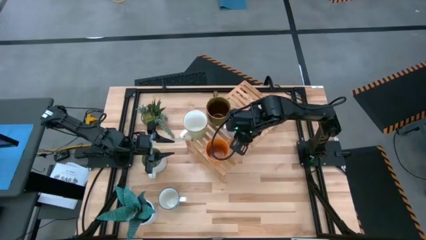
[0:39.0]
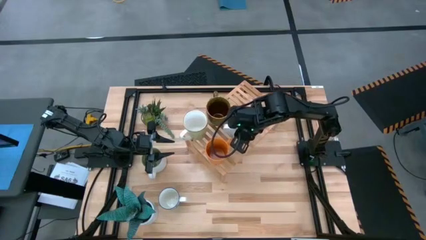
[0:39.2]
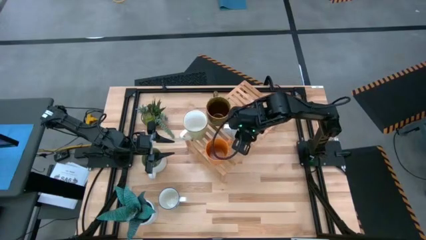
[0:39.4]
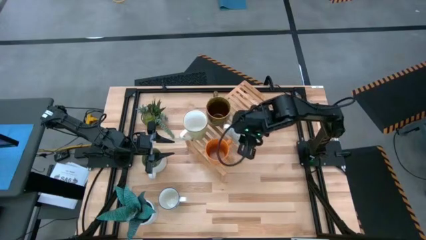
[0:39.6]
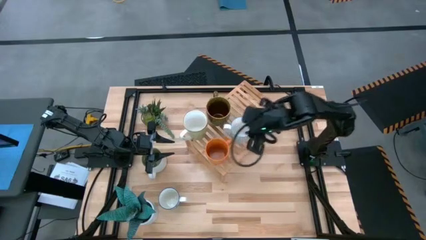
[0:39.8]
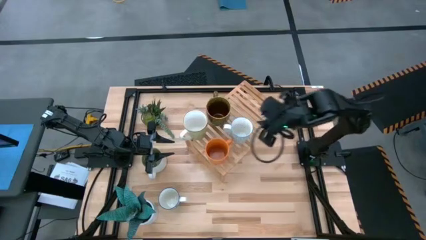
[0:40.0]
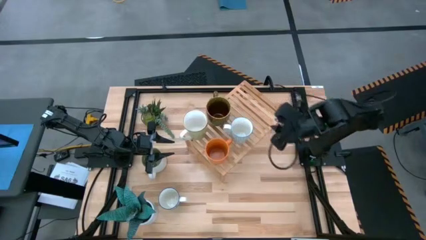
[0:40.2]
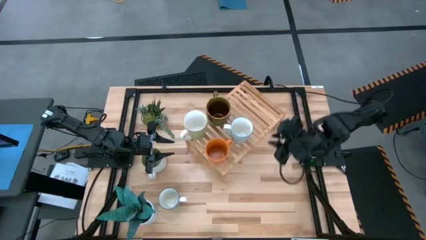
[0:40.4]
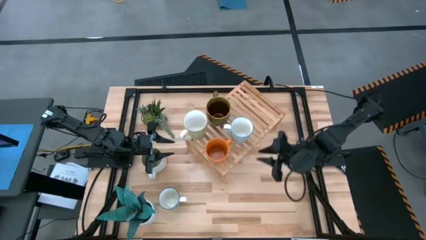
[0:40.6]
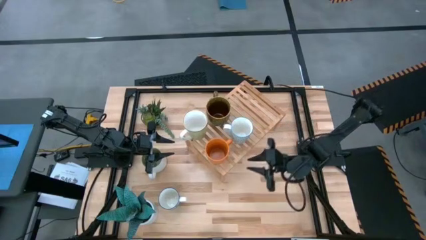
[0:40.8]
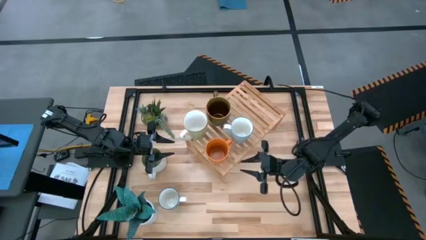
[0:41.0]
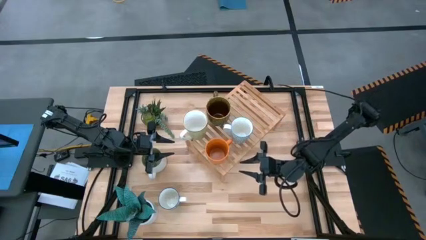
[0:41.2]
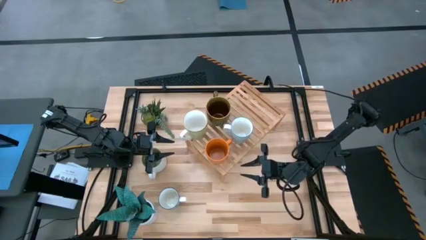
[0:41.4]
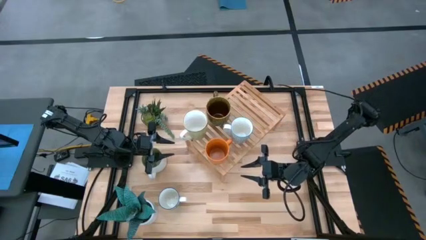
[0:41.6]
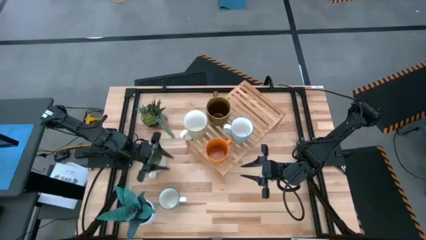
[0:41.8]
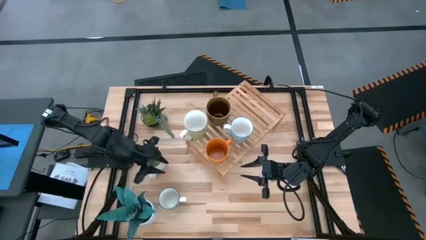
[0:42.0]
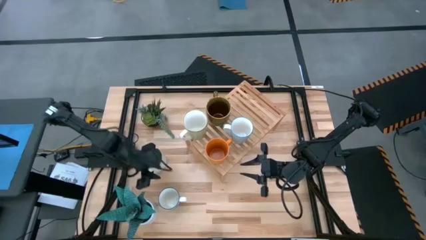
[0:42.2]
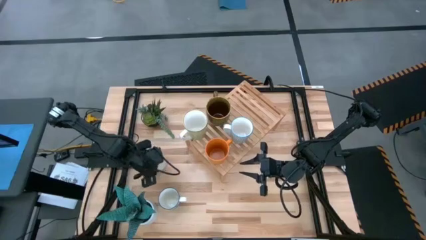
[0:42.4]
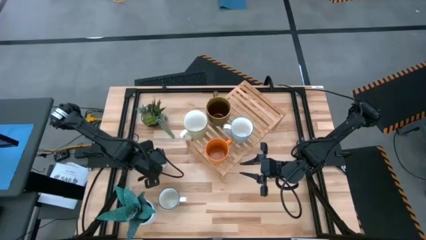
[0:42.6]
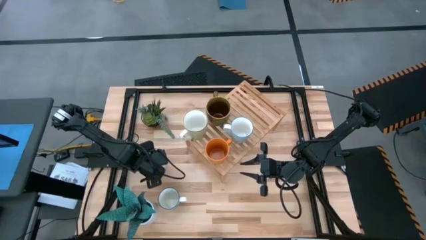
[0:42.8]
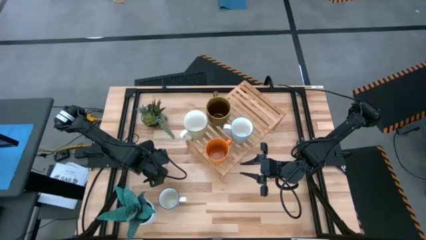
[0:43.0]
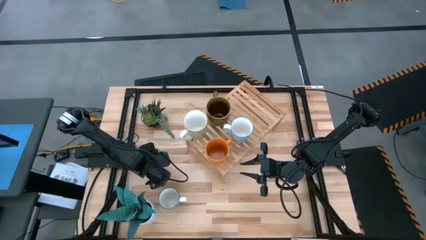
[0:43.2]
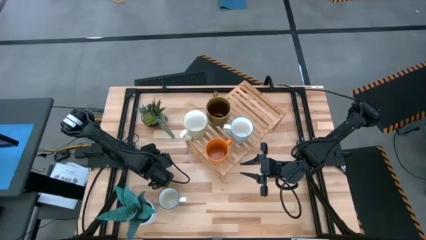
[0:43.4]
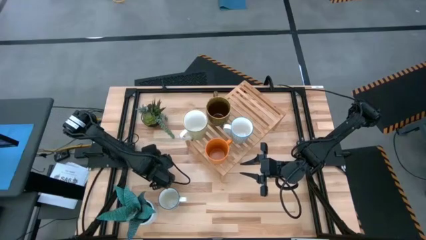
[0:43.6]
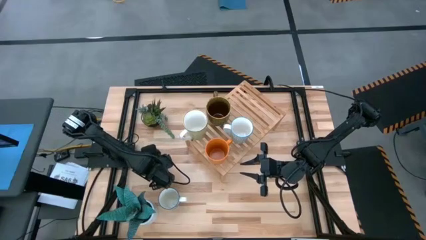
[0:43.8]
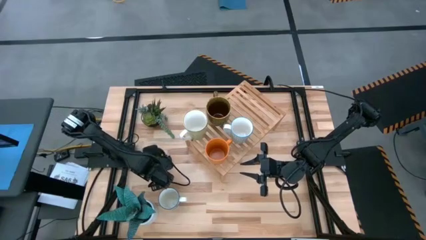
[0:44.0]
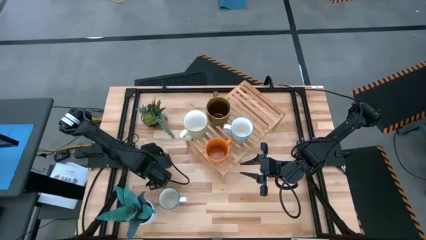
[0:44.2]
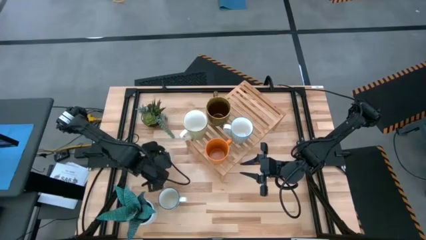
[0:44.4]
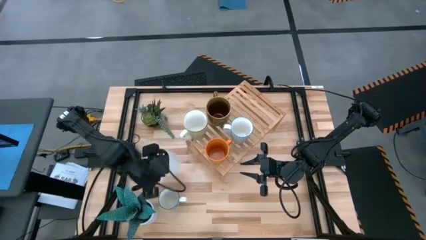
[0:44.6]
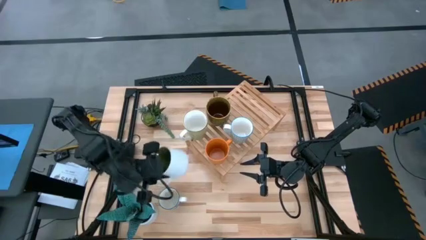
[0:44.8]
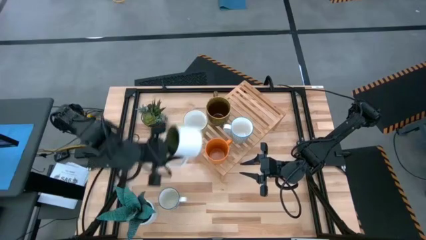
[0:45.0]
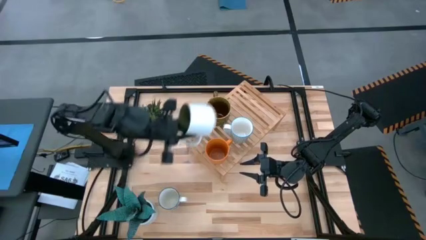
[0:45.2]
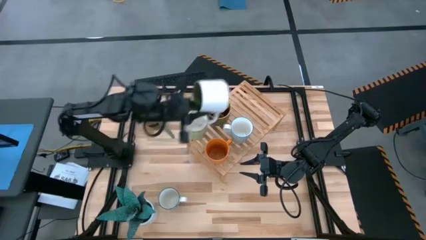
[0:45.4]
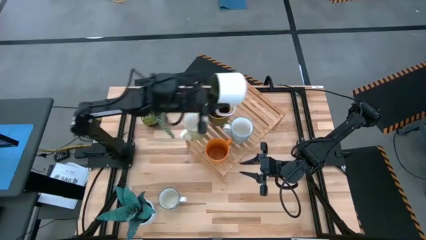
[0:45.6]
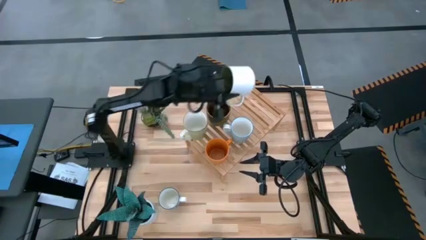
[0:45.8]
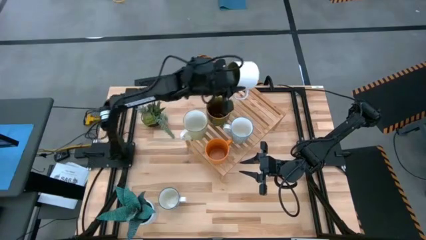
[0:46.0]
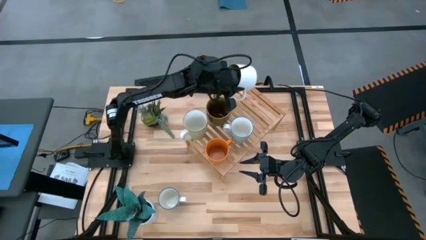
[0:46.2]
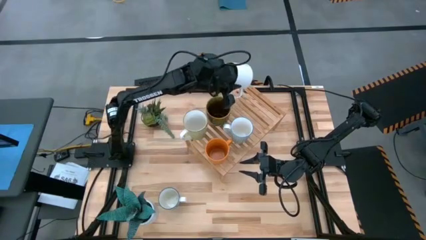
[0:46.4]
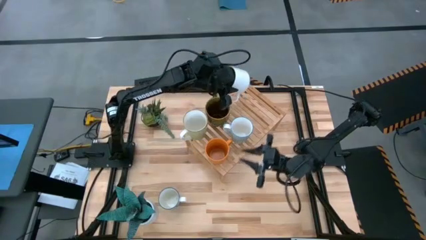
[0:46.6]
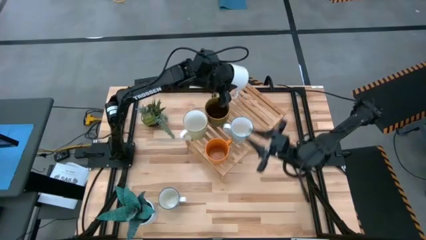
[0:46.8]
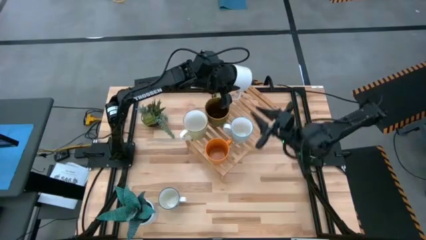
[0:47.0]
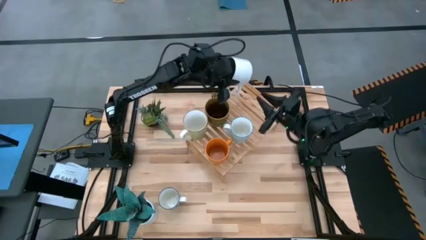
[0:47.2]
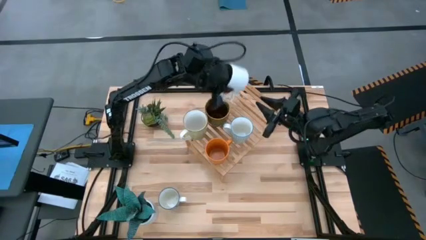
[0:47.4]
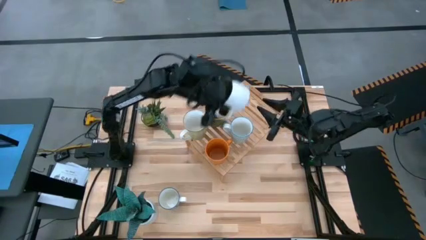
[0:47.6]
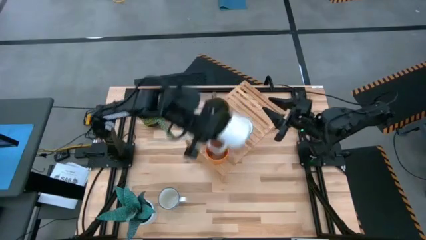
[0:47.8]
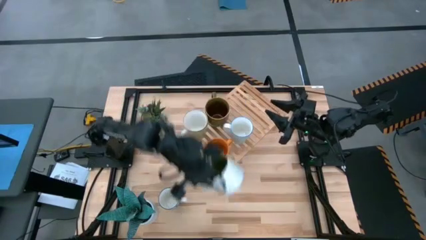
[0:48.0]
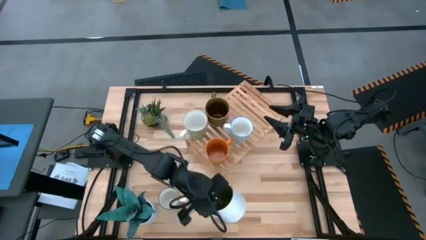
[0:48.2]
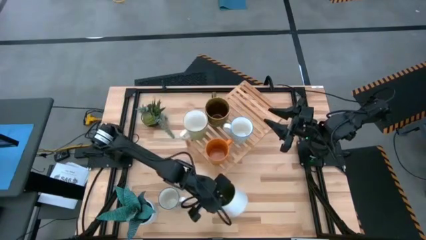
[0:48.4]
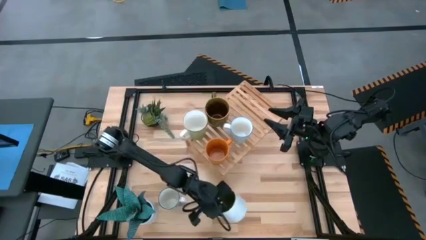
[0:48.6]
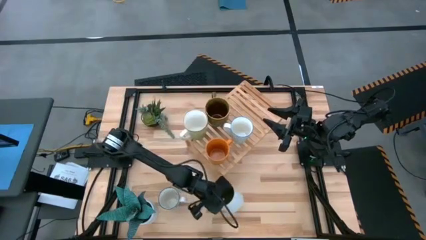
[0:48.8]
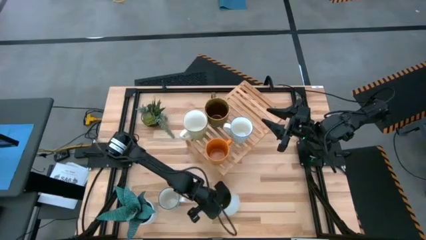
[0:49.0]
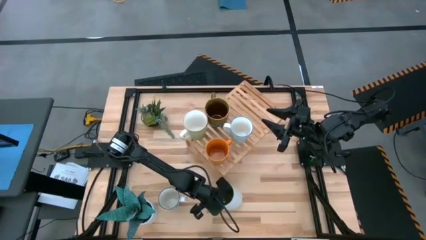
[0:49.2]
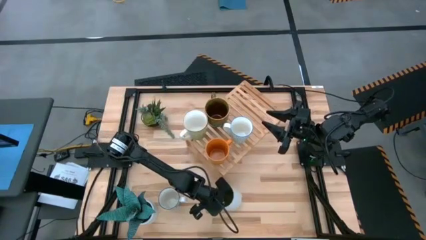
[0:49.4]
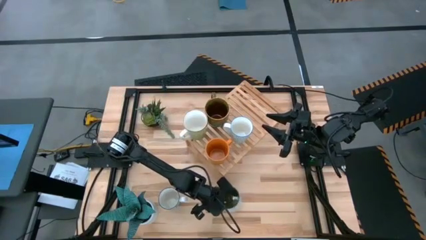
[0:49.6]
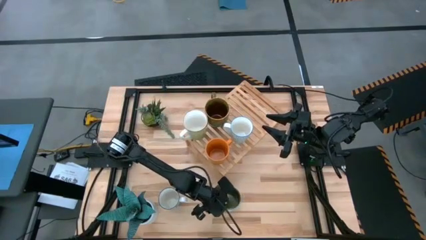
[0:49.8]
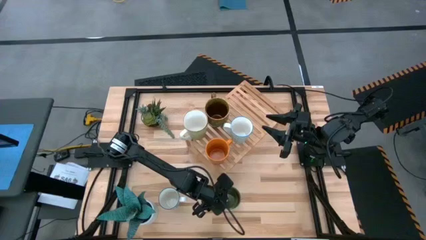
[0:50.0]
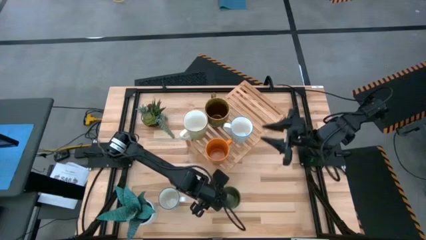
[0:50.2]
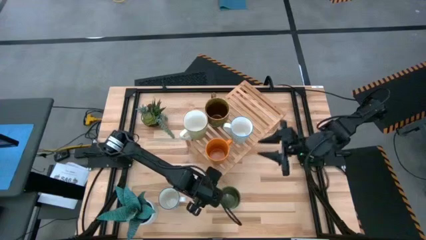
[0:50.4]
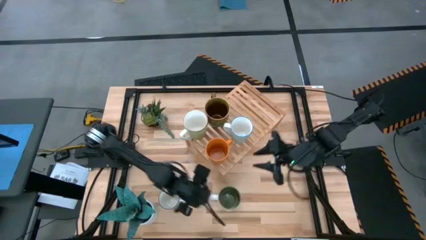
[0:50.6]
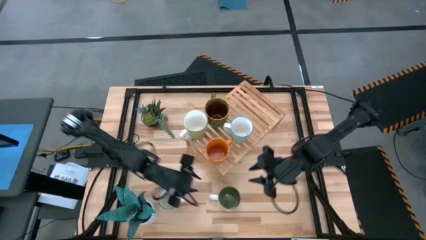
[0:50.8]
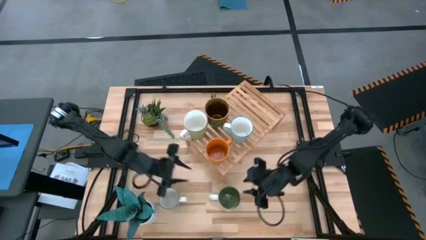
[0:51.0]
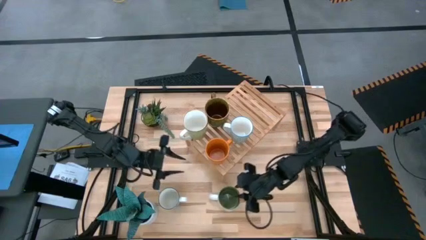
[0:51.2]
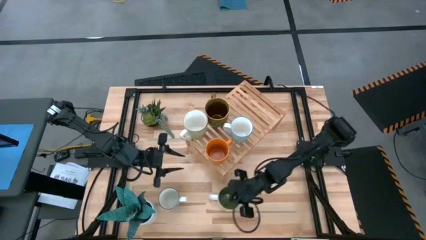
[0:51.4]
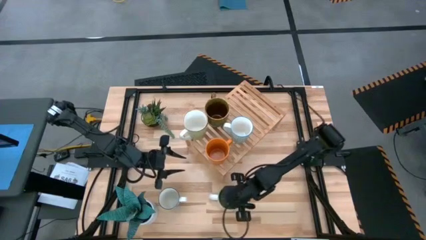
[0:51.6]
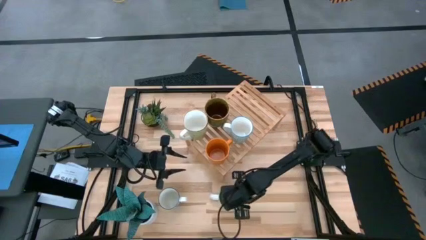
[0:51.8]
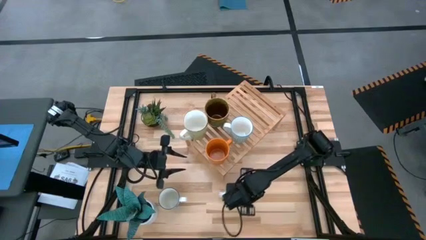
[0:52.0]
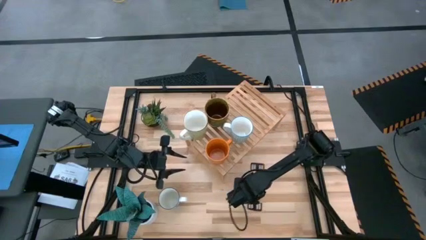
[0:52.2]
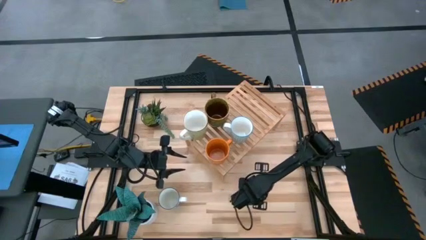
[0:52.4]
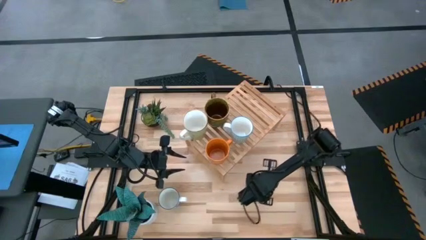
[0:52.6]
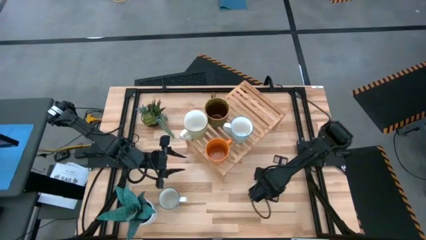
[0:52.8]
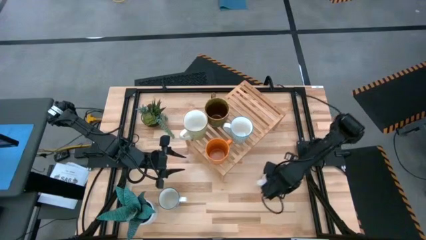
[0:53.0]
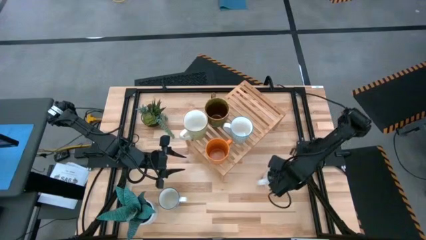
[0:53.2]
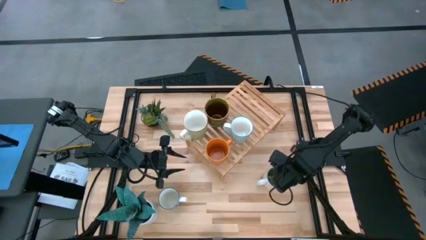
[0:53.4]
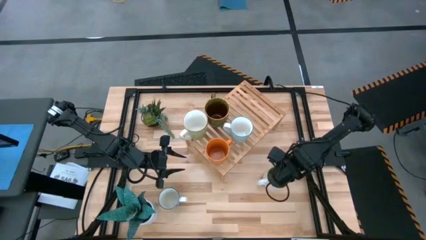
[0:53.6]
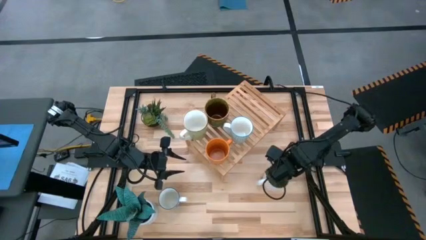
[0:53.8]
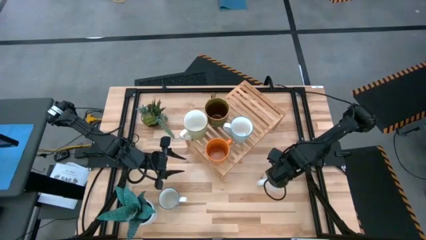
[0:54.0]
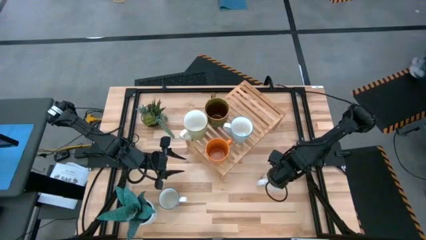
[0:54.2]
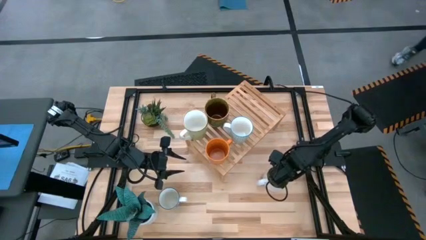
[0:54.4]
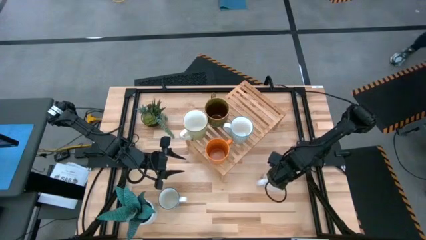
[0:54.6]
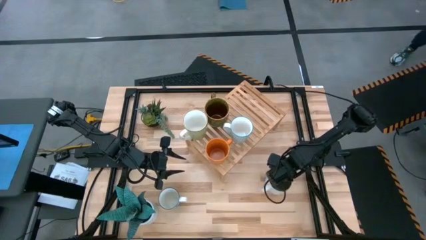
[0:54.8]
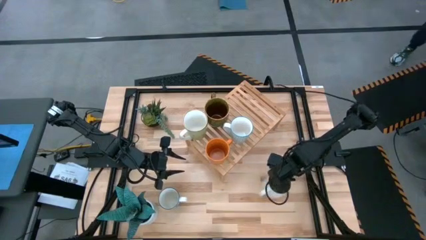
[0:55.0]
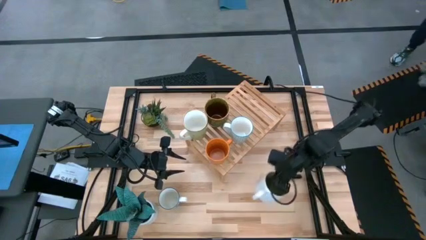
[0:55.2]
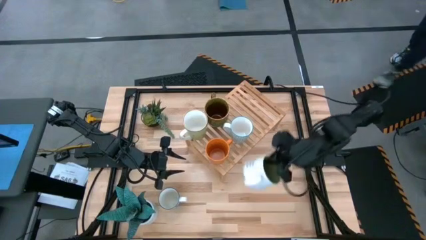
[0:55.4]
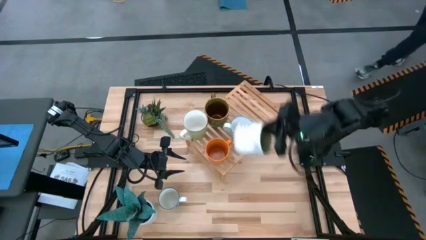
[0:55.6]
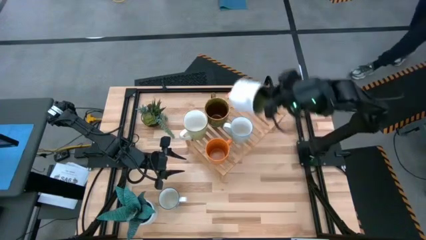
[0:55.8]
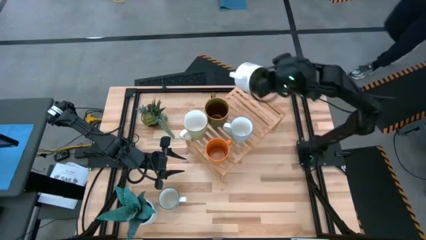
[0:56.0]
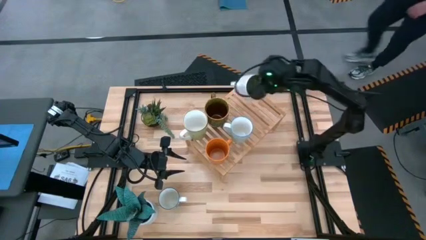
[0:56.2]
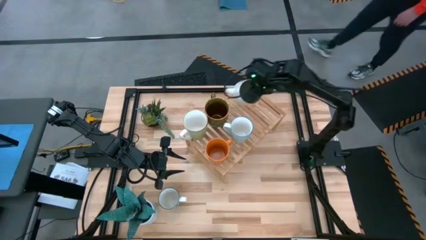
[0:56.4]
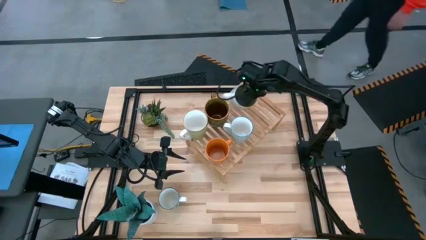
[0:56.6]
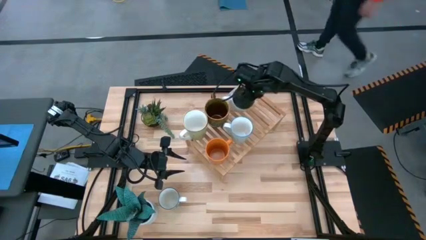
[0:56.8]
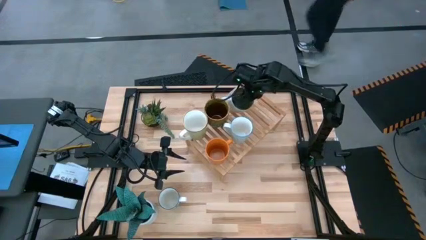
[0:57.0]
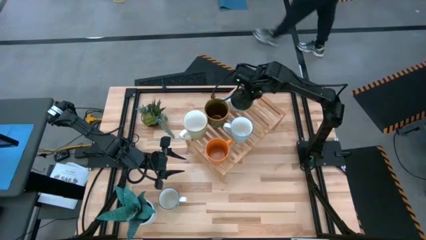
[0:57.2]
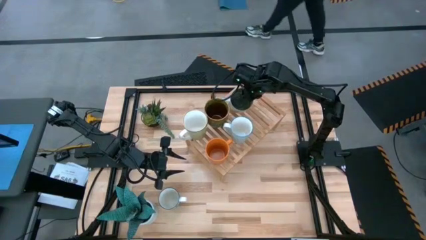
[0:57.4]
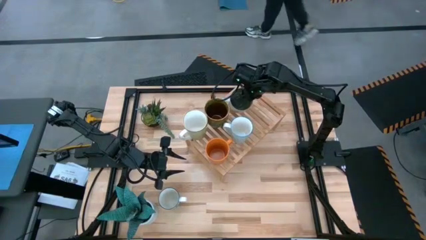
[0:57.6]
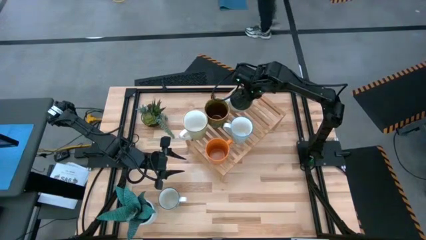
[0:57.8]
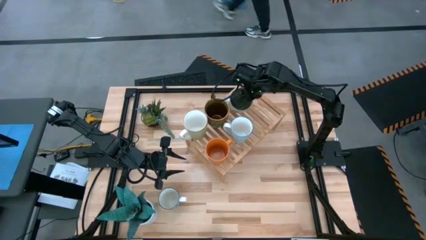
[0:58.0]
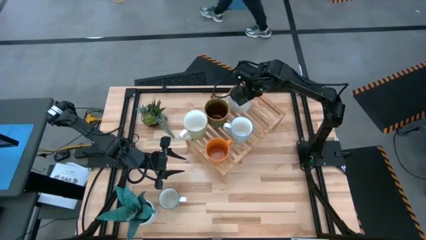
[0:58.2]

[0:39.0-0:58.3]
Task: Place coffee mugs
Put the dark green mug on the shelf
